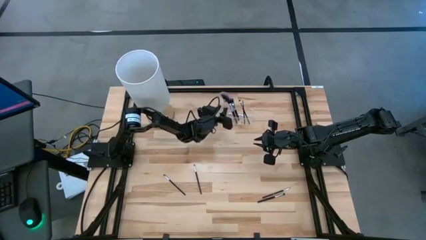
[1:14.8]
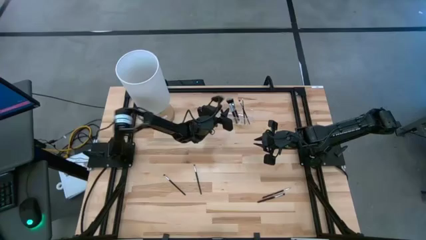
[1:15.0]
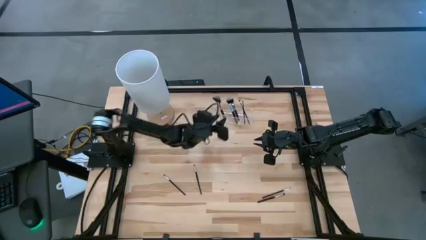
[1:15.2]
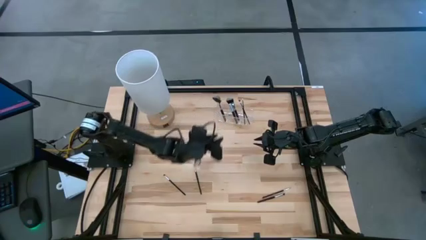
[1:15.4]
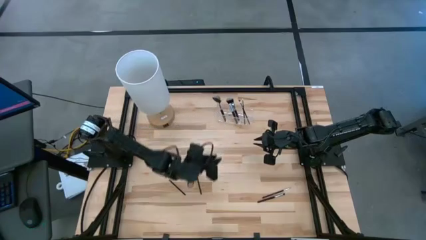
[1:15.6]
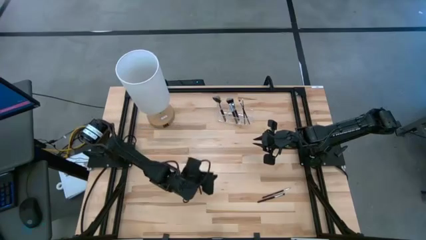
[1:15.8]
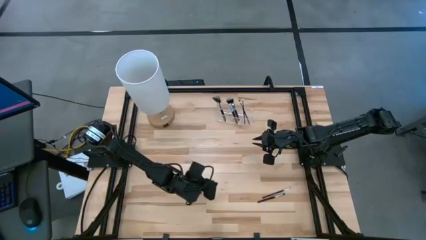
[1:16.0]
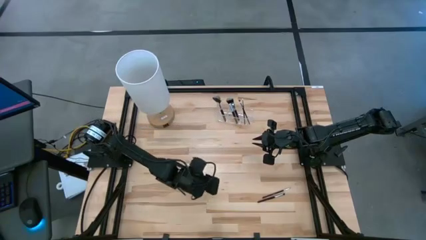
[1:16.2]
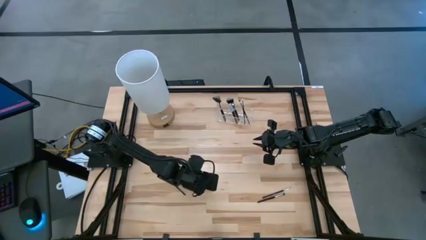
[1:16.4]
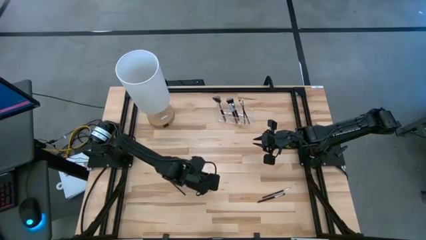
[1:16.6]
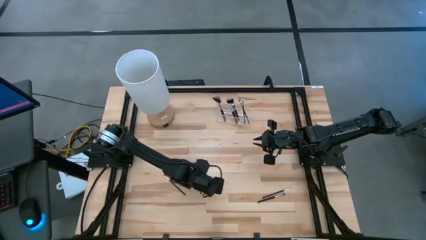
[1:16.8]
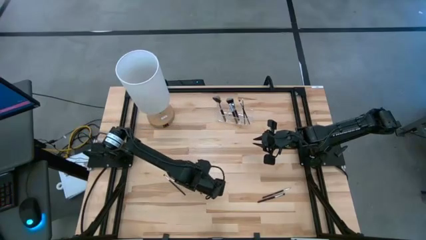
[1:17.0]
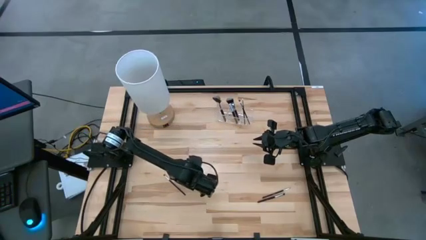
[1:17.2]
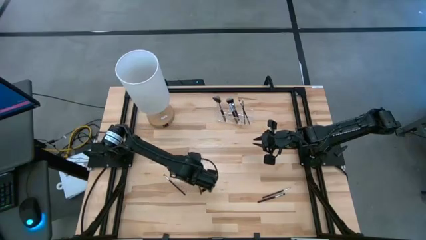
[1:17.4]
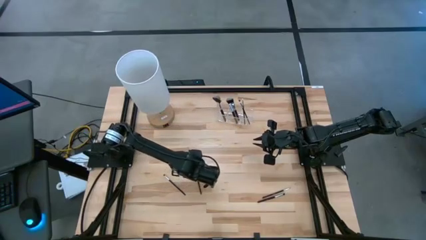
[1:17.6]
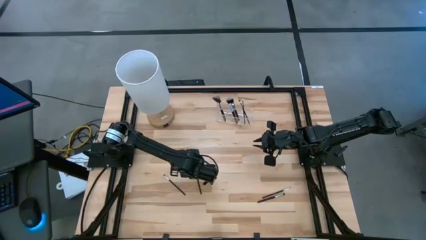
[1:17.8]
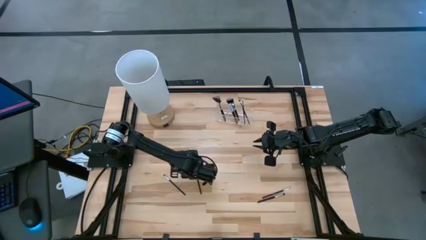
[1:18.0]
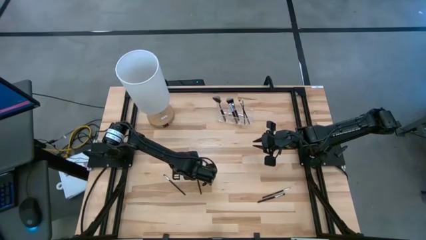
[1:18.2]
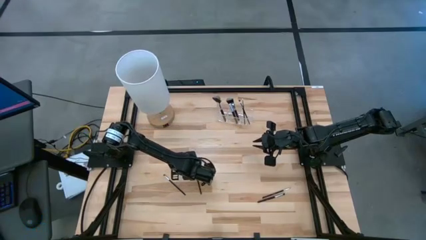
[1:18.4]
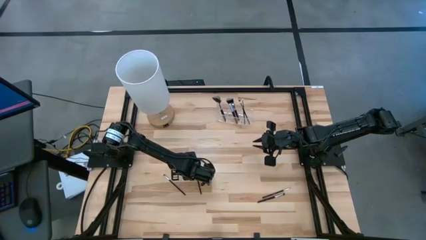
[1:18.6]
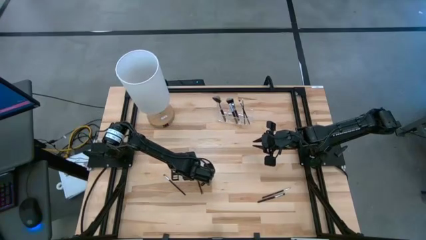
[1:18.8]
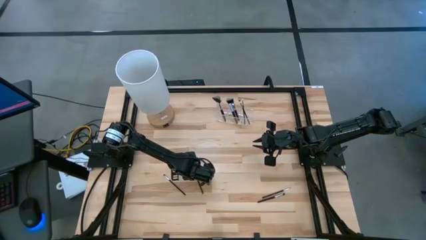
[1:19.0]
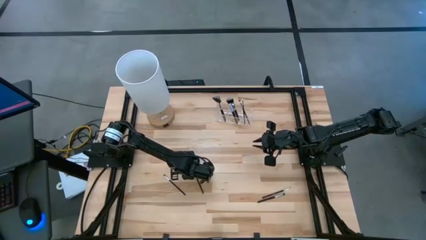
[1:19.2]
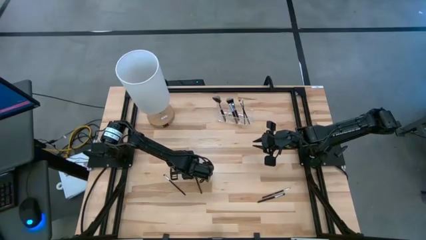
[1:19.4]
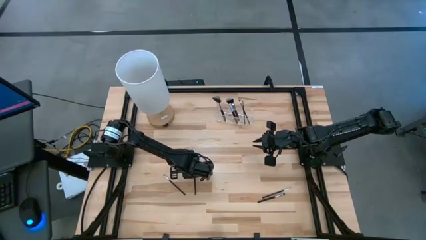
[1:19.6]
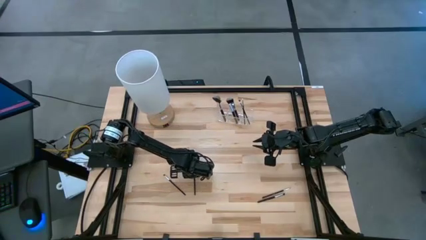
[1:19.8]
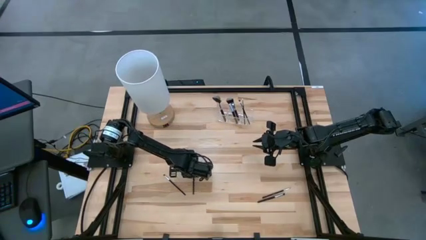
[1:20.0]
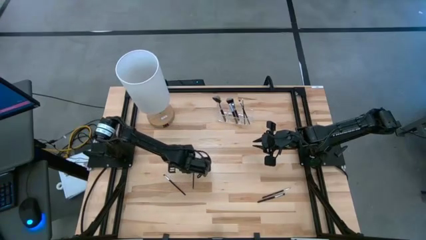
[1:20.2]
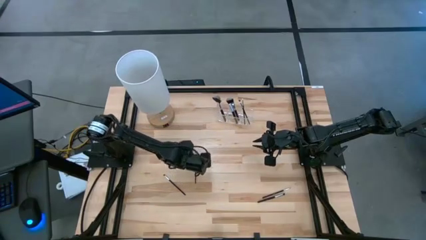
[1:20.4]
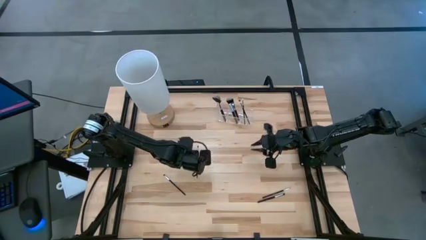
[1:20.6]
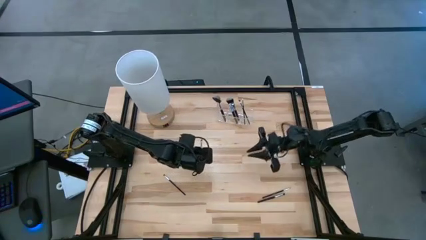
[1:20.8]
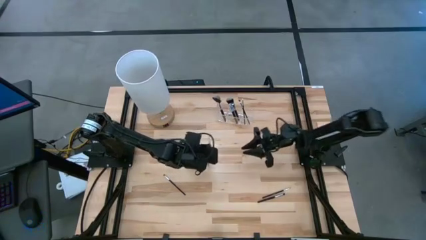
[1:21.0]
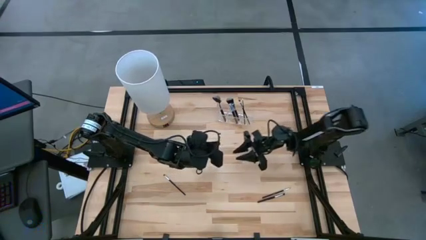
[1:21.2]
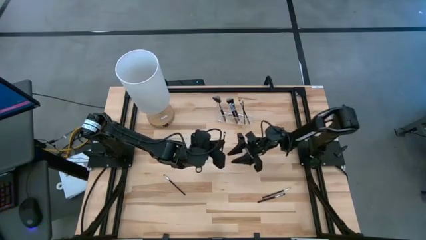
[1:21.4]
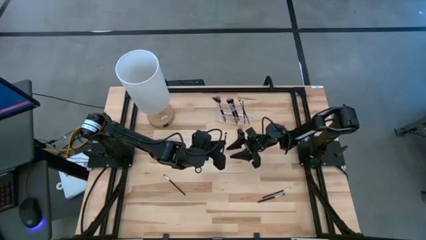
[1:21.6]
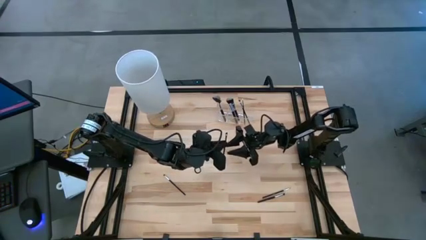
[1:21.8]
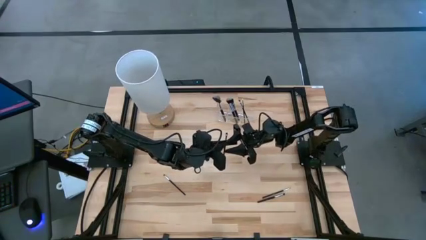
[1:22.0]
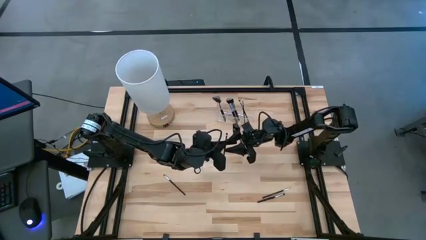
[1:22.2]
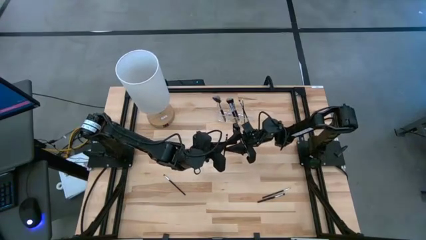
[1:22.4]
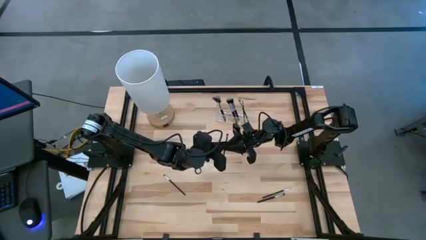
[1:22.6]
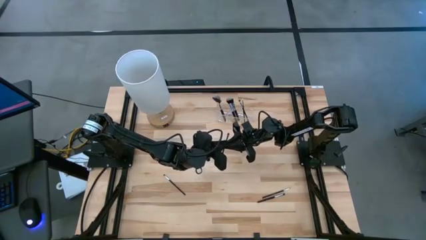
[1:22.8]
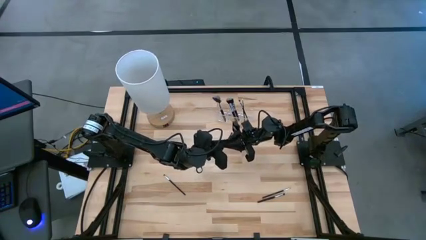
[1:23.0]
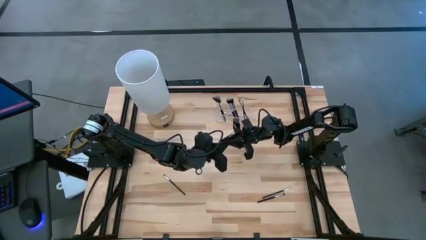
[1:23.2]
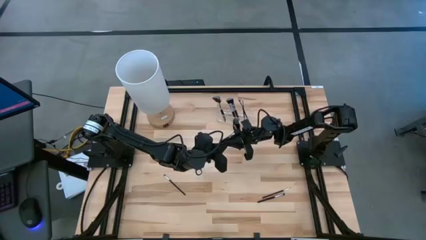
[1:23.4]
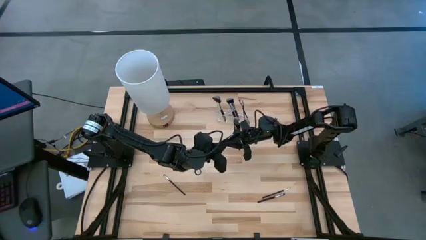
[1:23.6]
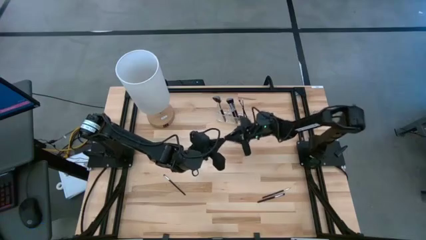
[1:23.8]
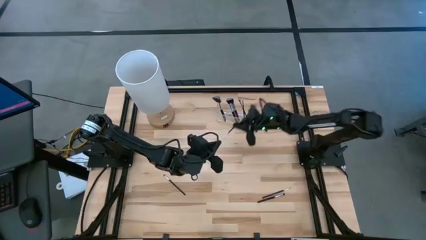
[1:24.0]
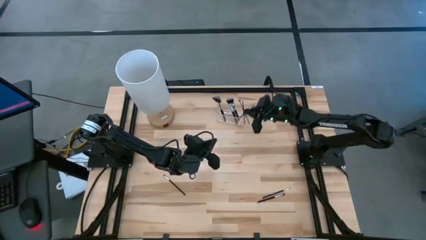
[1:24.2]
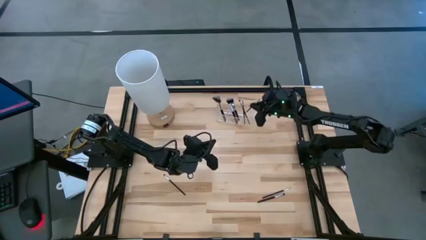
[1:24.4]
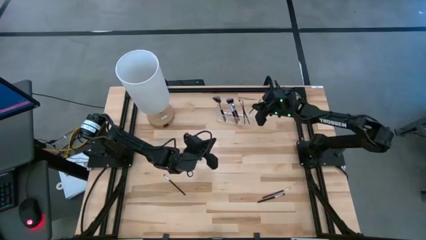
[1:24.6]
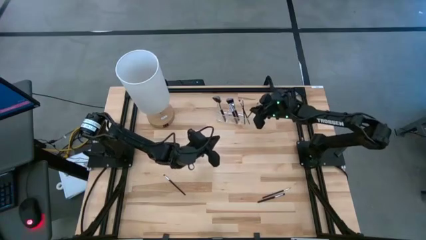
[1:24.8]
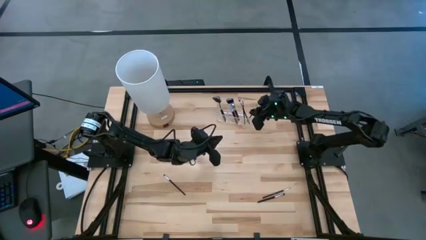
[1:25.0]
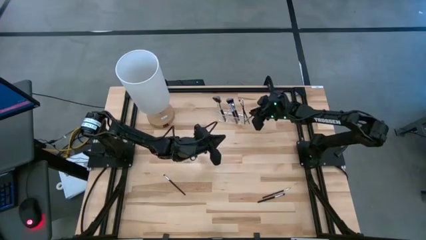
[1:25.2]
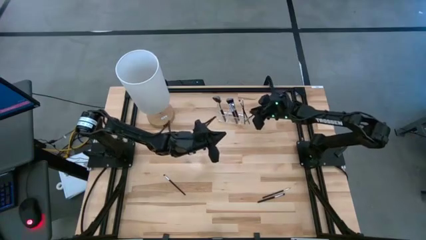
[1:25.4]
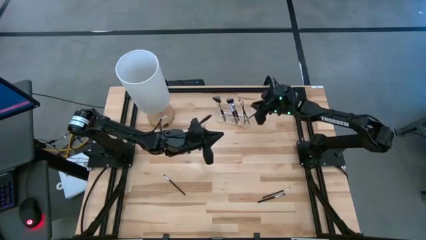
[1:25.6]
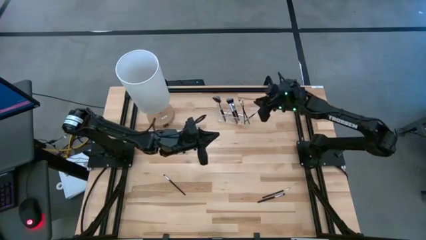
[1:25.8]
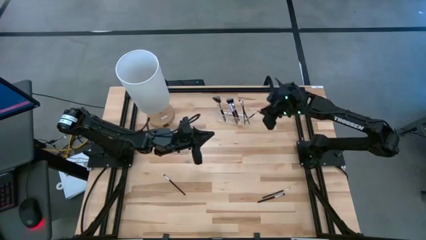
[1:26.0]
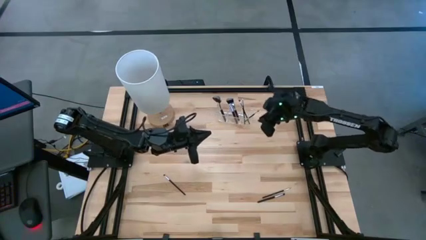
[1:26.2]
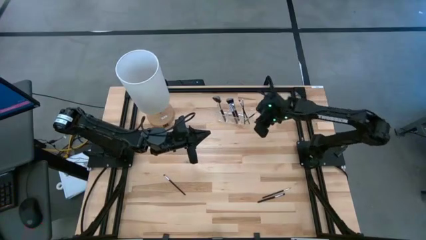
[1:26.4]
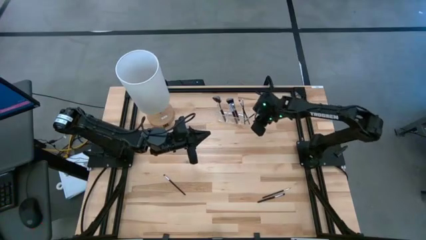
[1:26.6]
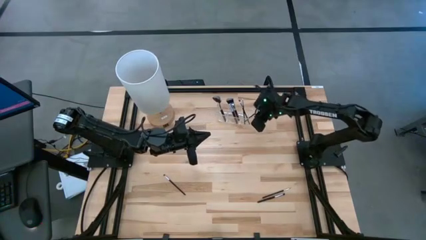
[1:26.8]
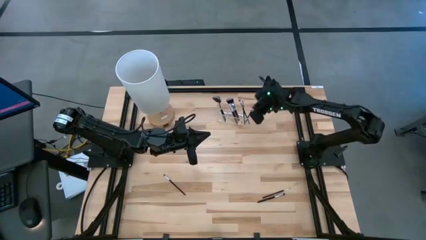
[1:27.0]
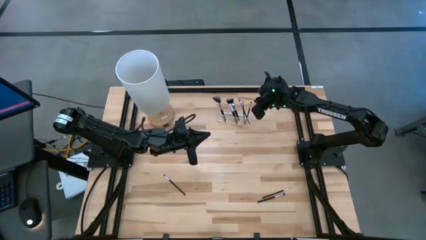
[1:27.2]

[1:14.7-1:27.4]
Task: Put items in baskets/containers
Put the black eyeshadow brush into the transparent organizer
